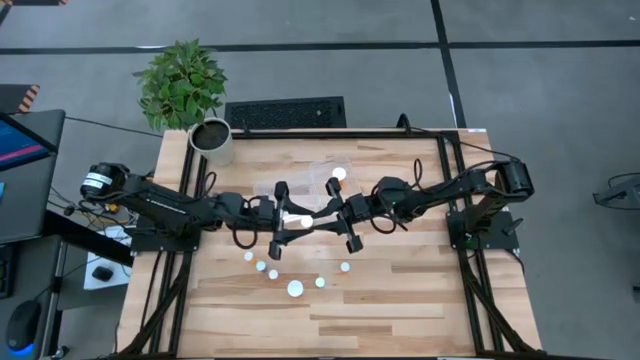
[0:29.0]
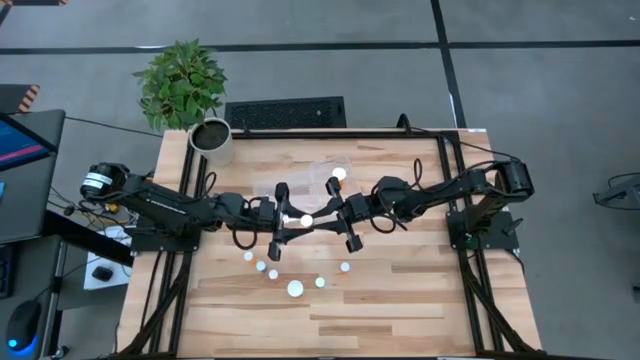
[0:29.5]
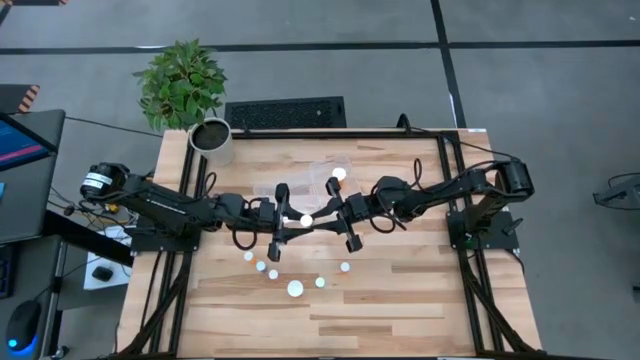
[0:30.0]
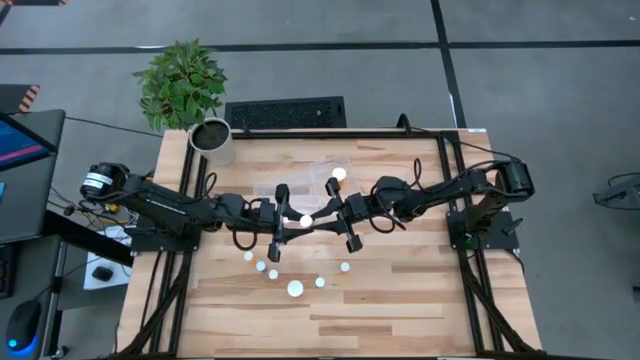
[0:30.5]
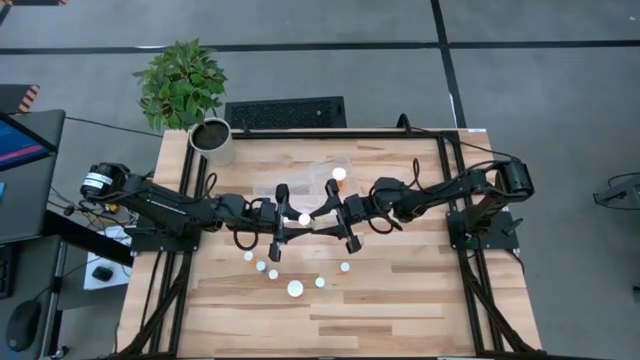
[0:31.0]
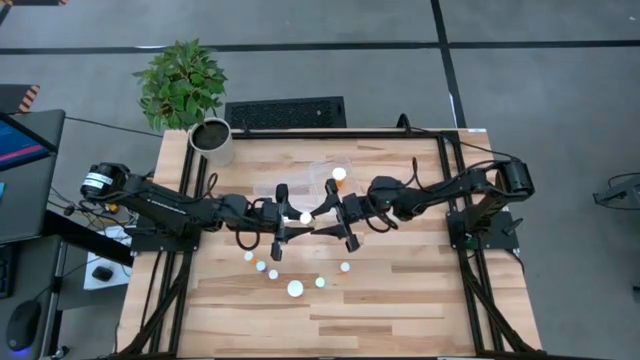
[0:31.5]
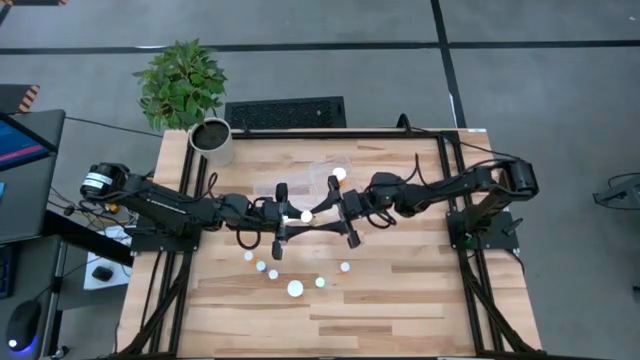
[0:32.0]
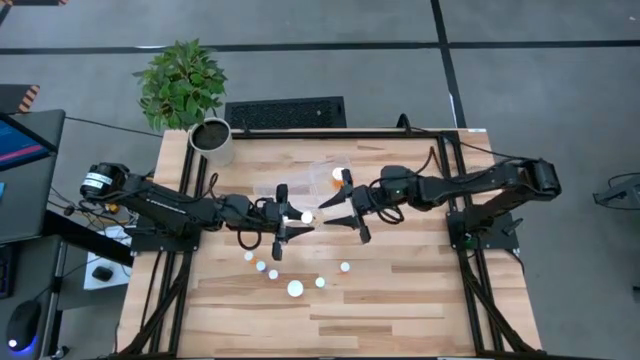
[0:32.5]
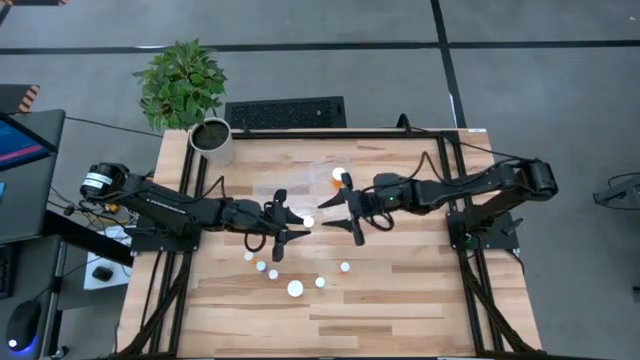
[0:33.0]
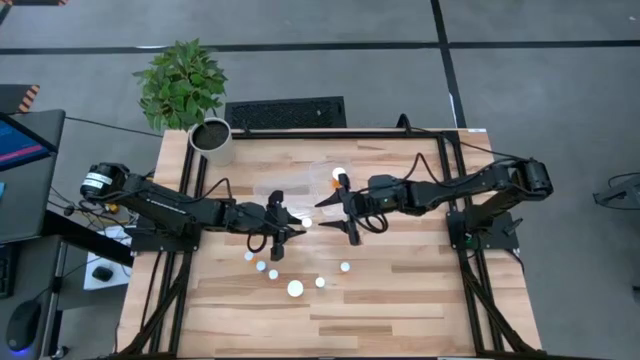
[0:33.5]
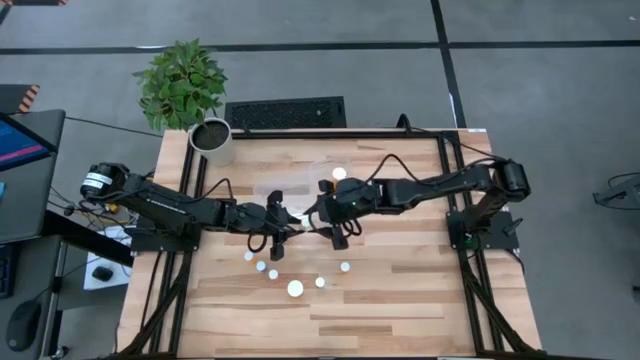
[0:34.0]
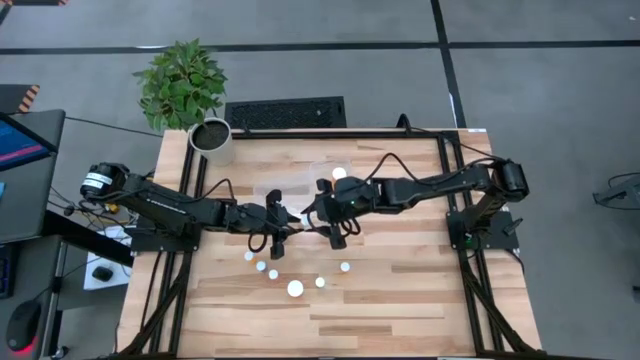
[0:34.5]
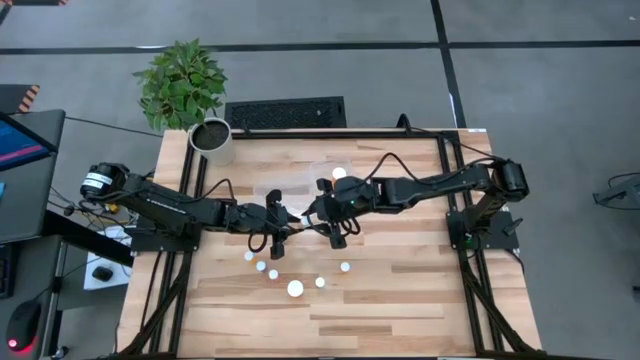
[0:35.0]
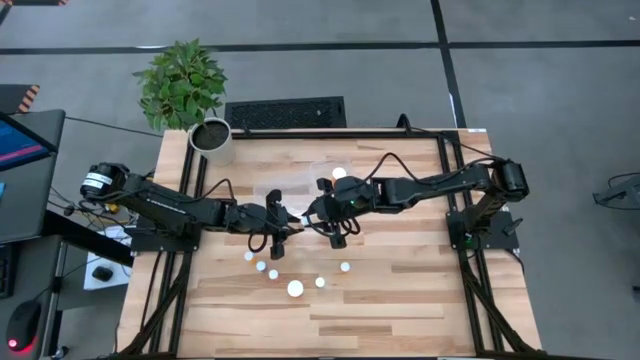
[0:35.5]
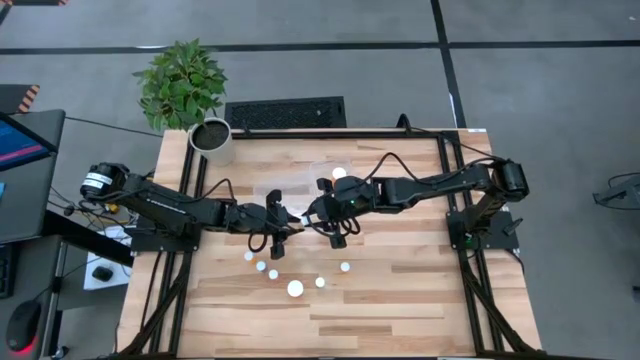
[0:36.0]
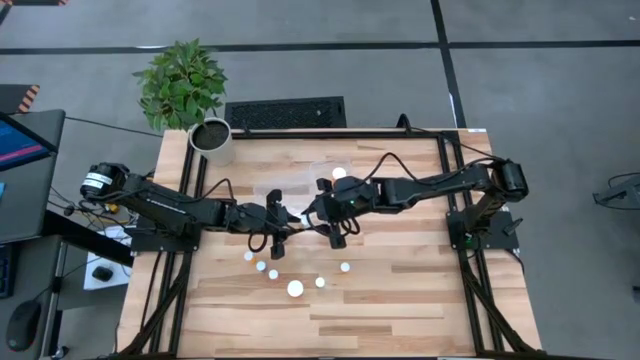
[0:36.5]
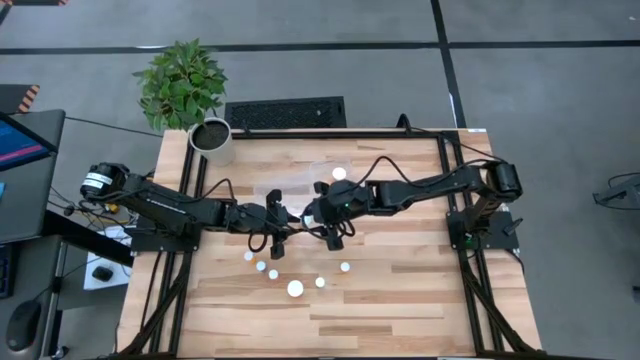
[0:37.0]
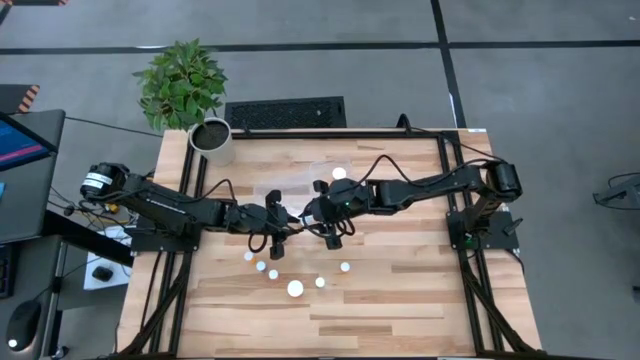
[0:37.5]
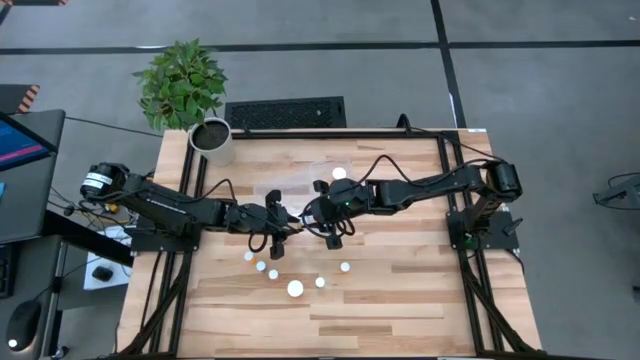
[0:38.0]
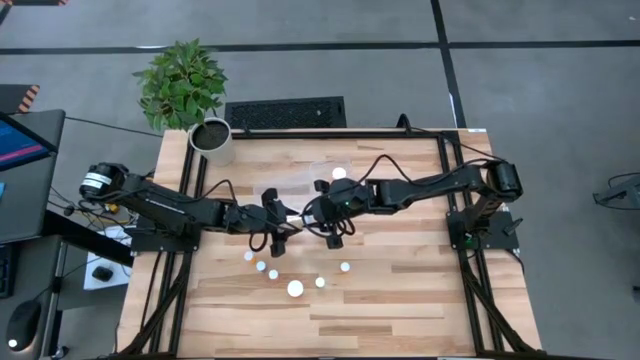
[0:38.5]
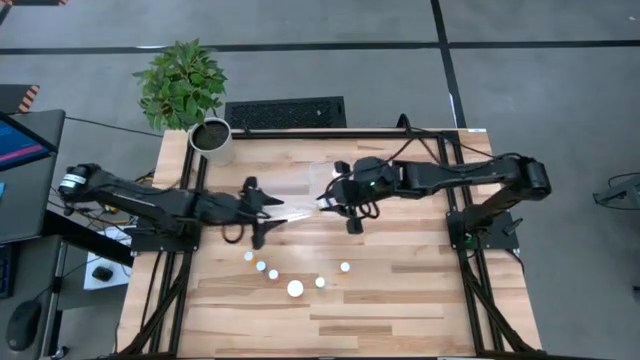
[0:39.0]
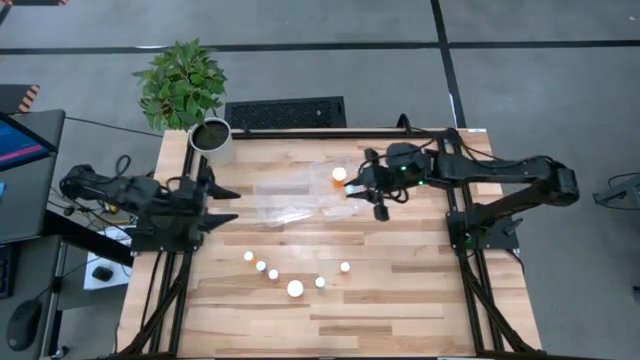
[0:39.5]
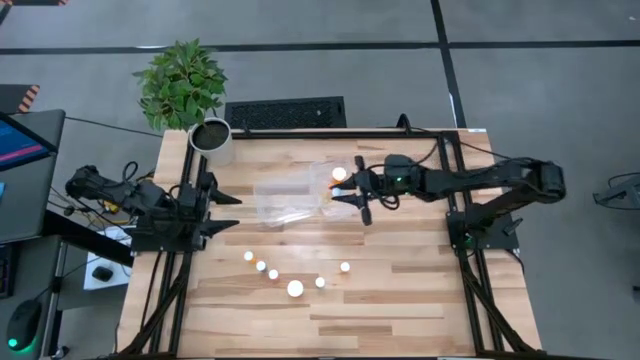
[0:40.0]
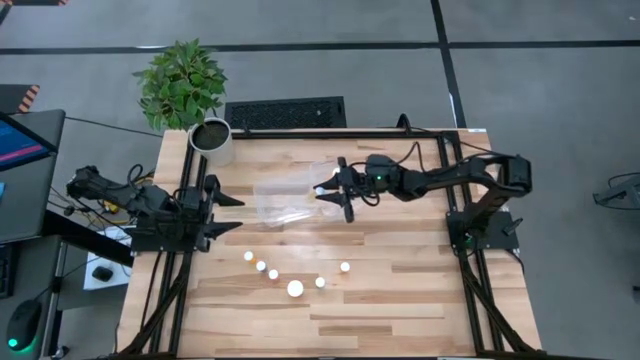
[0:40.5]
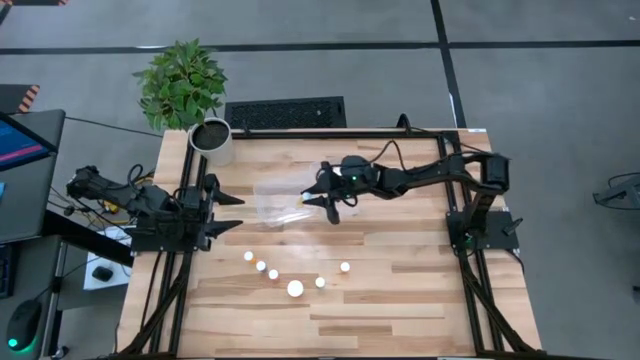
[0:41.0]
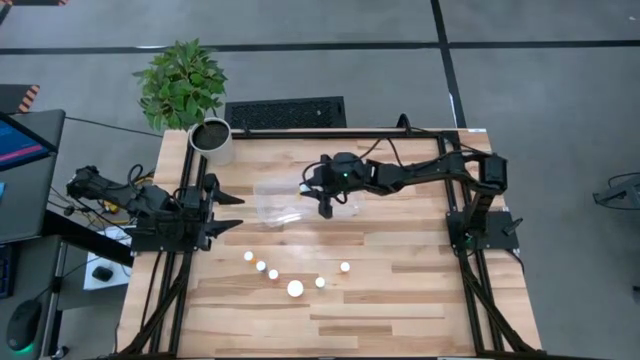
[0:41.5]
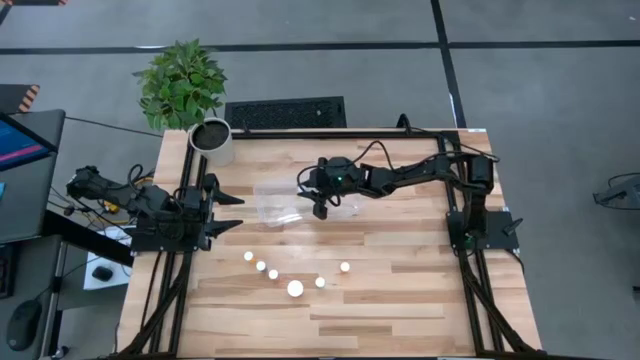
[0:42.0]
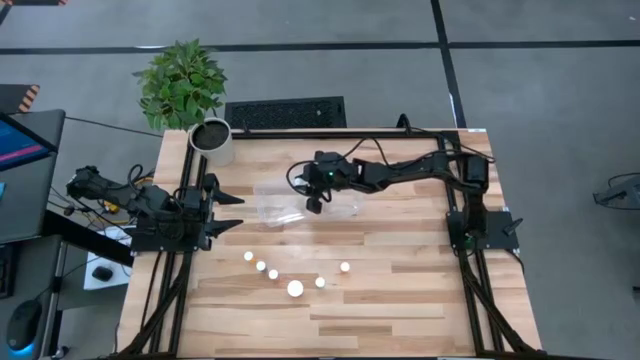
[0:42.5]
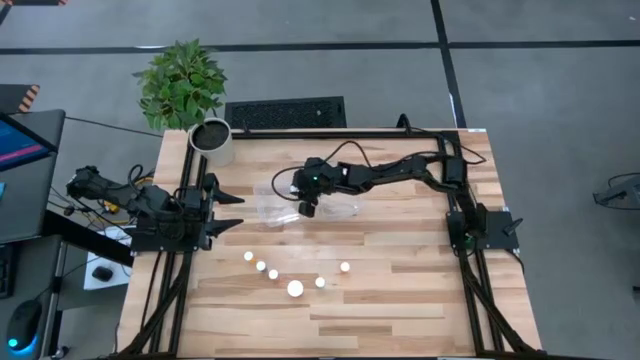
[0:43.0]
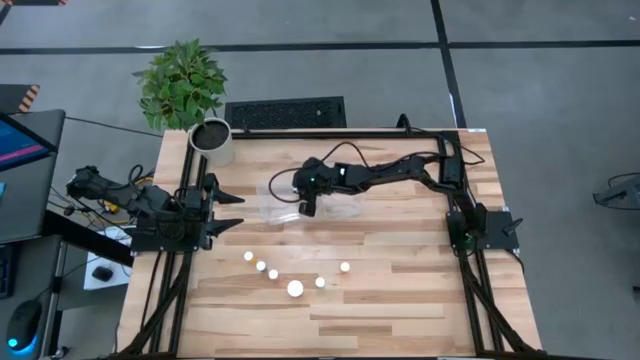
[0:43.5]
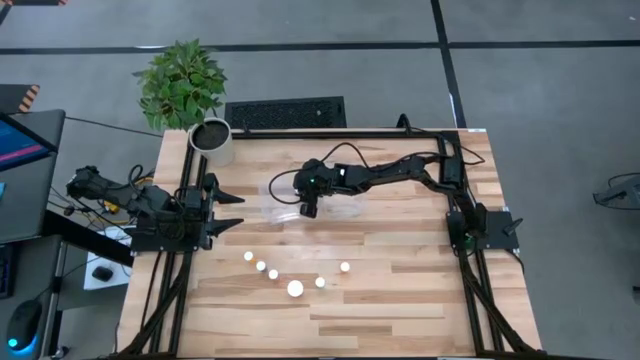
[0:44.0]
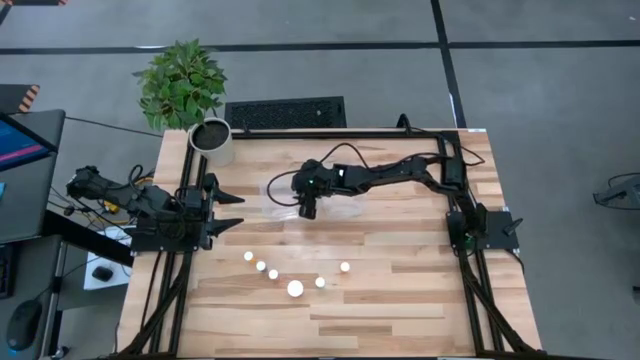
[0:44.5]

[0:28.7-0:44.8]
Task: Pick and place medicine bottles into bin by pill shape (circle, oval)
Put the yellow tablet bottle into the left transparent bin

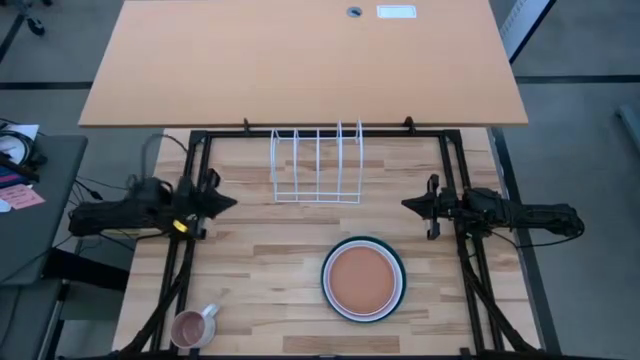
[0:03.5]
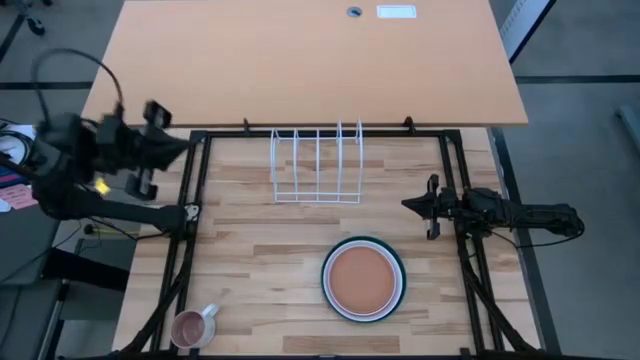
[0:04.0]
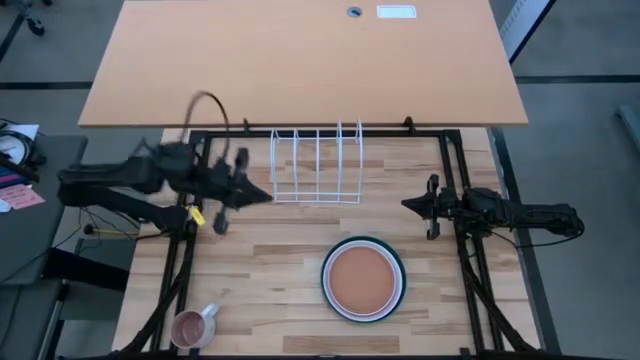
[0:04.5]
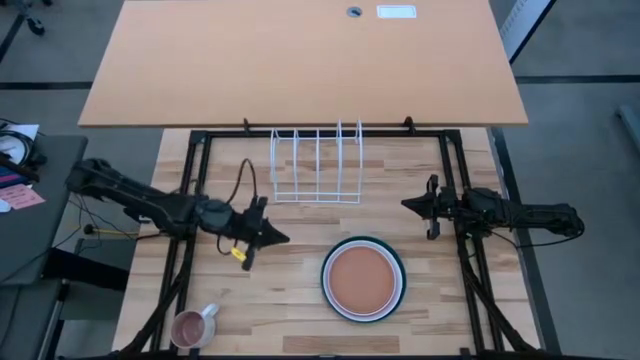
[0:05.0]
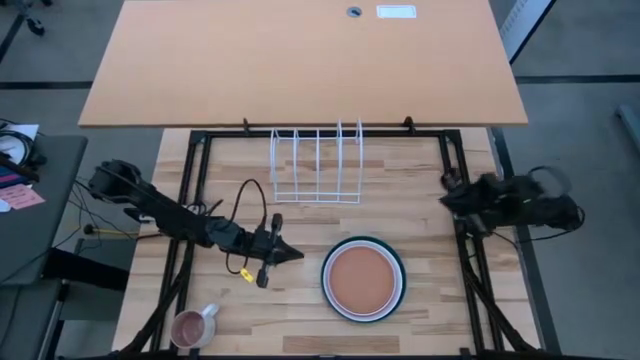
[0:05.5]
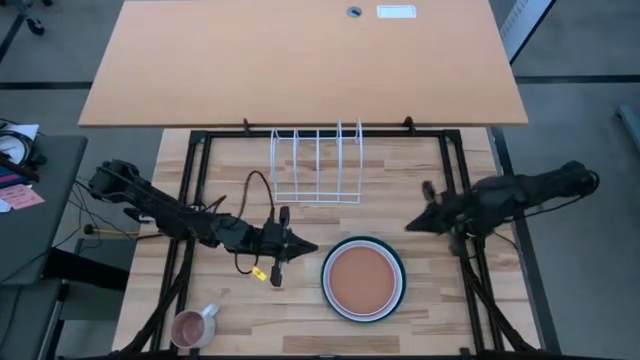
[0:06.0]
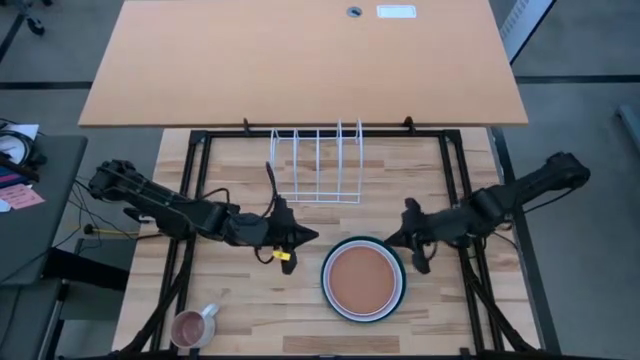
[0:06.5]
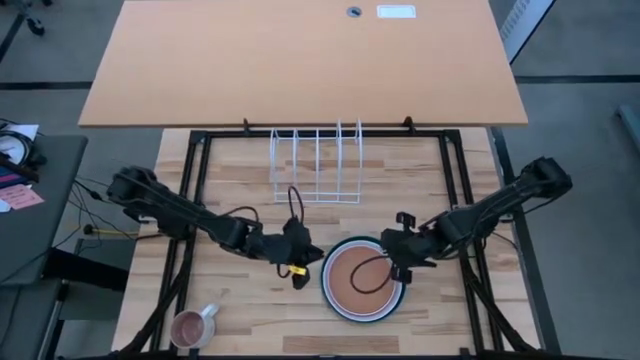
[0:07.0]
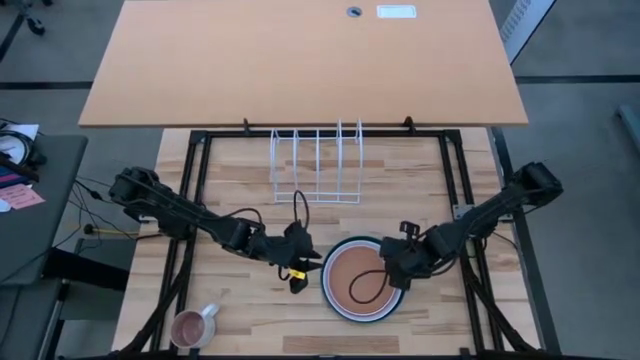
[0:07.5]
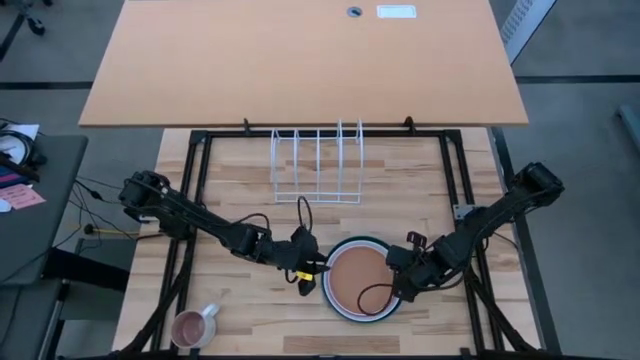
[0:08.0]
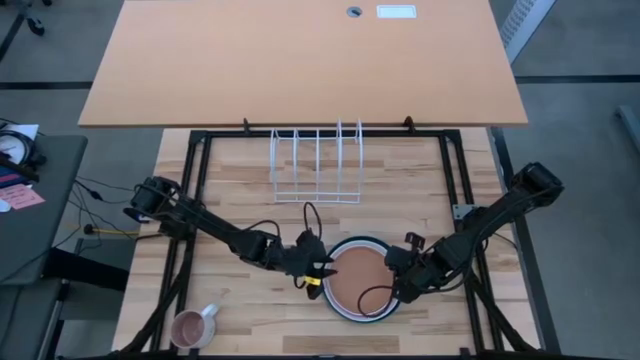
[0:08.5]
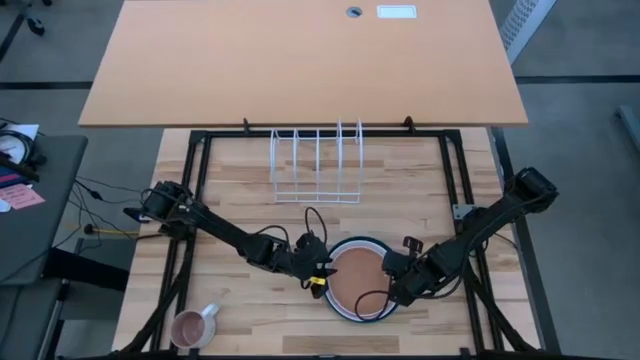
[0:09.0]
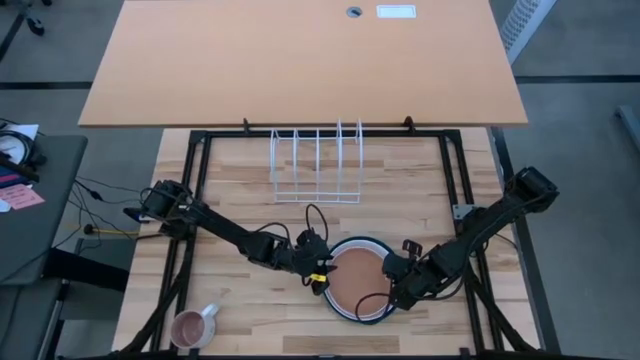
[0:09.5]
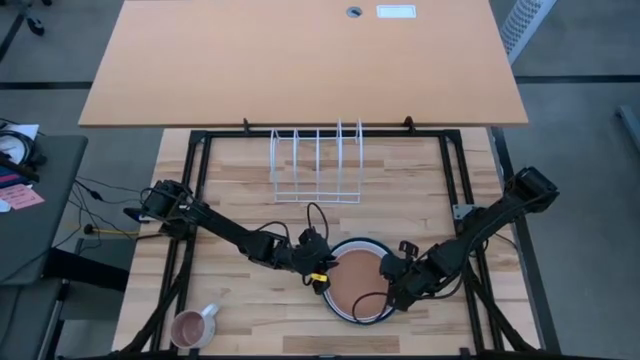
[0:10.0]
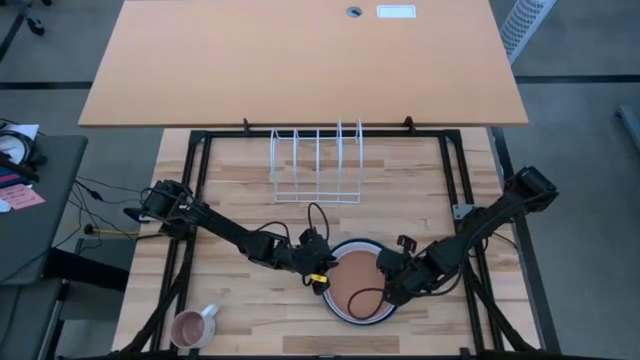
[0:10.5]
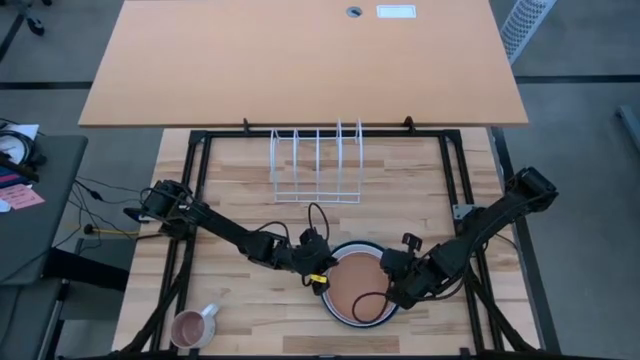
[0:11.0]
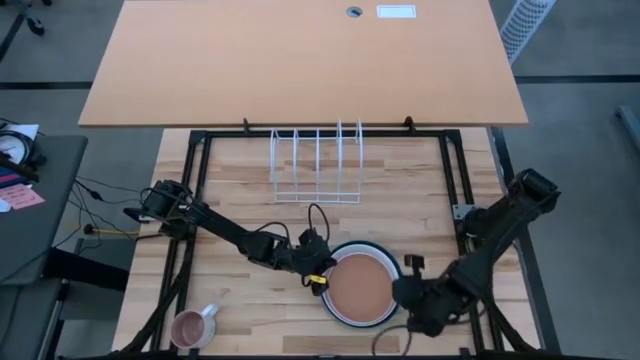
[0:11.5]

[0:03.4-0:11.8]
Task: Sort dishes
Put the light orange plate in the dish rack
